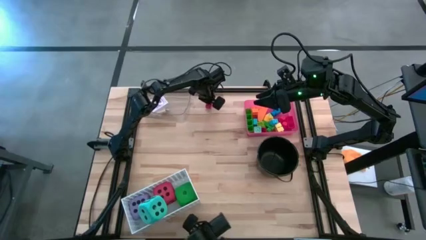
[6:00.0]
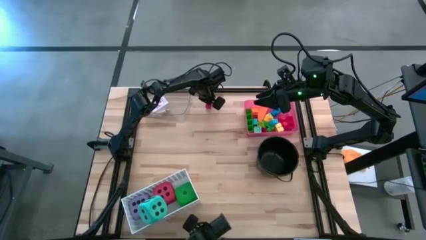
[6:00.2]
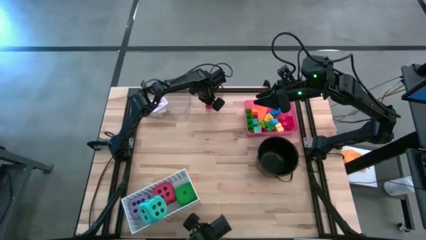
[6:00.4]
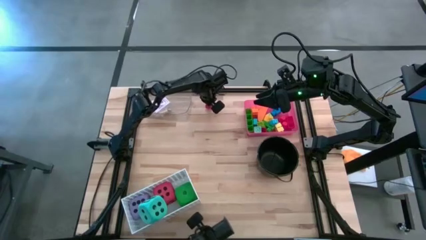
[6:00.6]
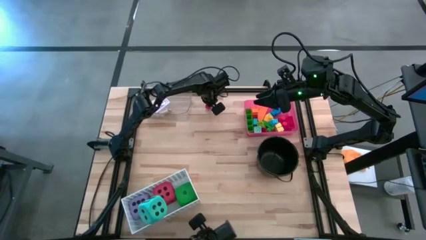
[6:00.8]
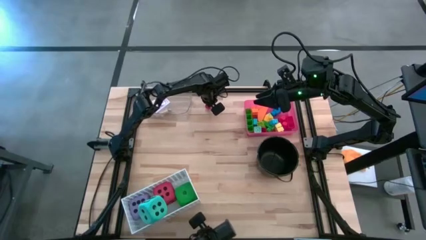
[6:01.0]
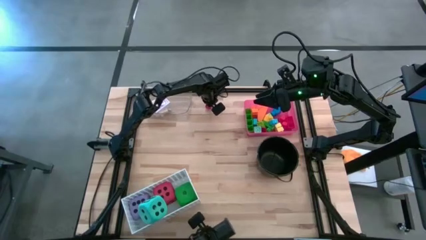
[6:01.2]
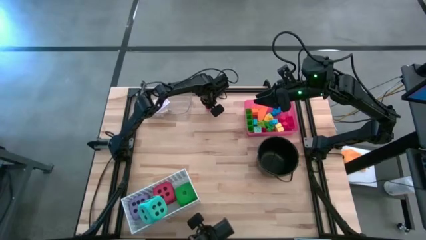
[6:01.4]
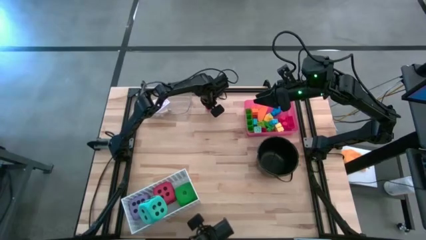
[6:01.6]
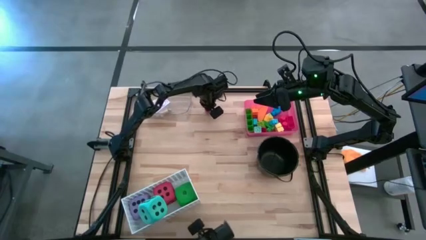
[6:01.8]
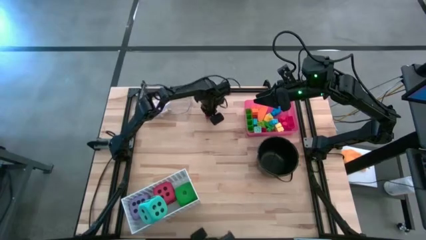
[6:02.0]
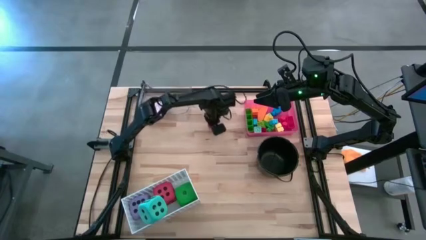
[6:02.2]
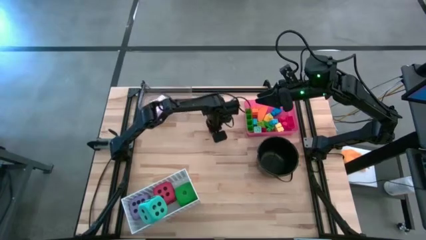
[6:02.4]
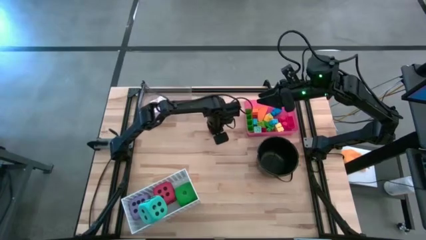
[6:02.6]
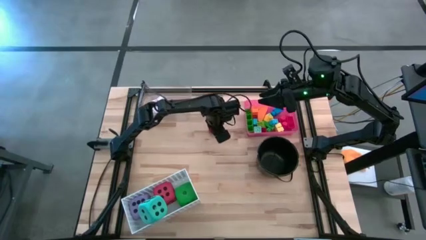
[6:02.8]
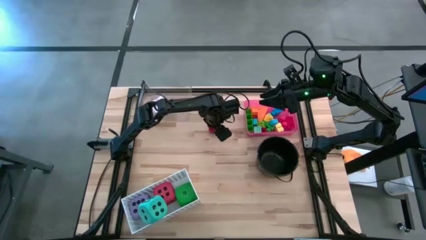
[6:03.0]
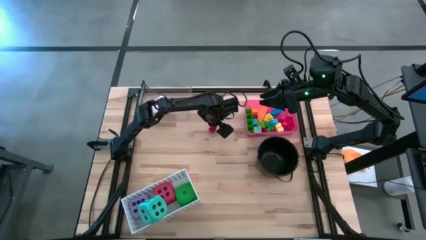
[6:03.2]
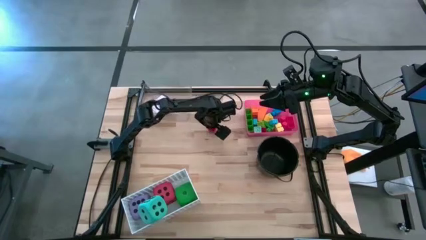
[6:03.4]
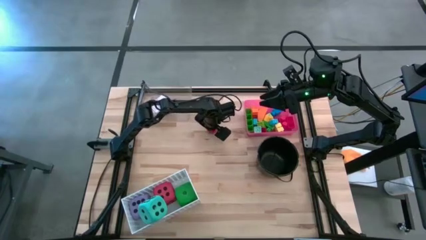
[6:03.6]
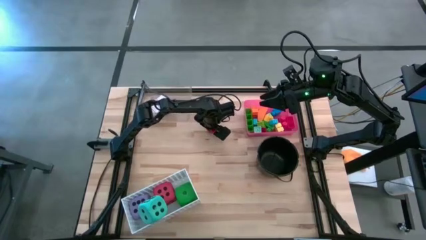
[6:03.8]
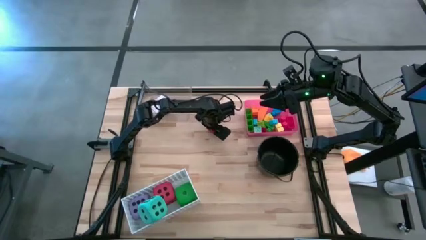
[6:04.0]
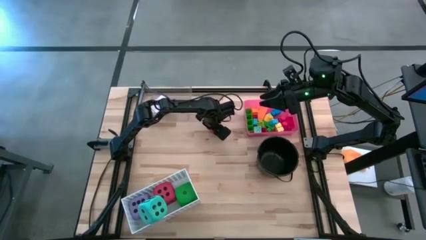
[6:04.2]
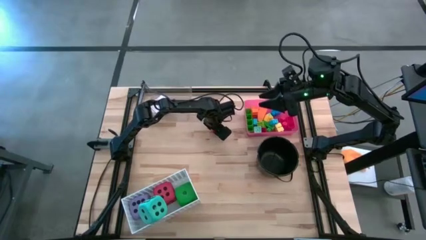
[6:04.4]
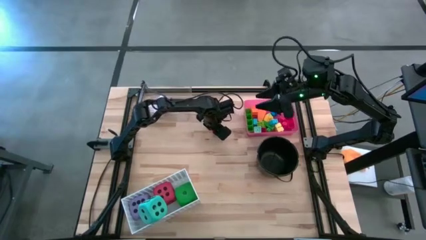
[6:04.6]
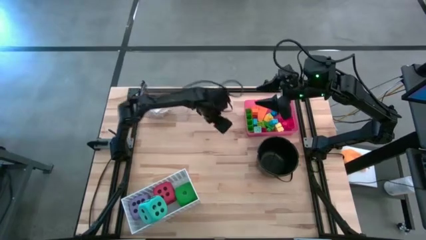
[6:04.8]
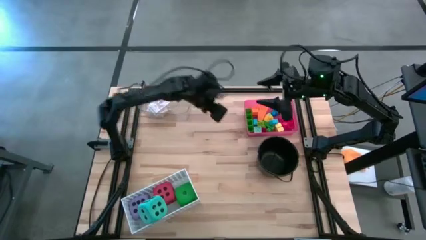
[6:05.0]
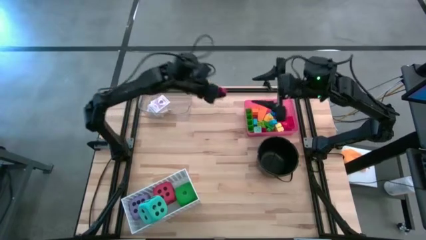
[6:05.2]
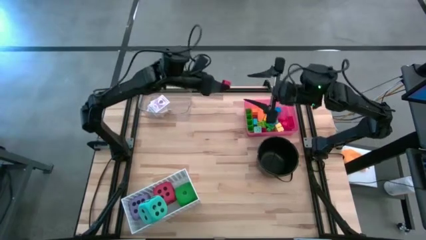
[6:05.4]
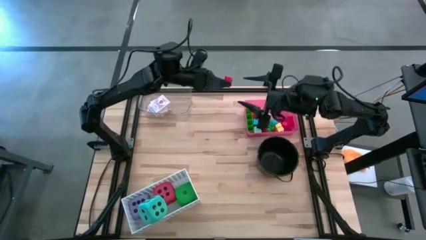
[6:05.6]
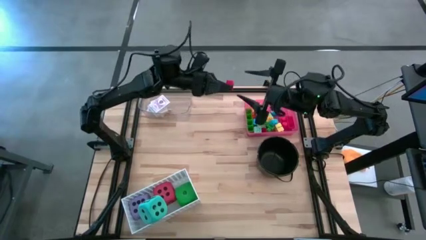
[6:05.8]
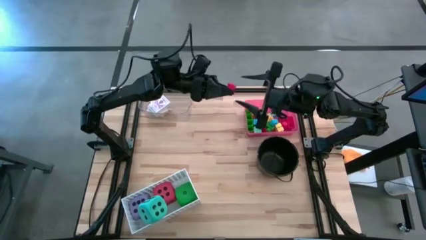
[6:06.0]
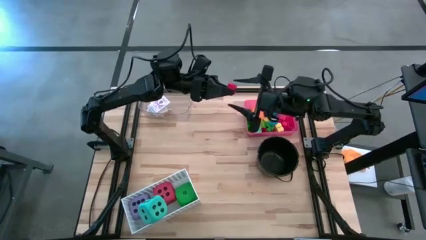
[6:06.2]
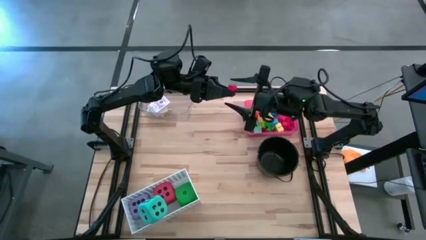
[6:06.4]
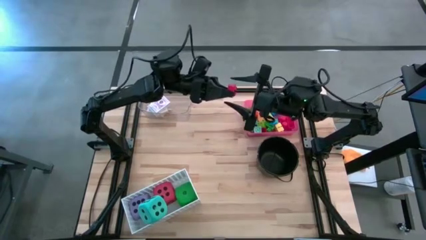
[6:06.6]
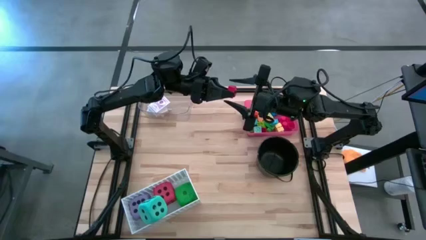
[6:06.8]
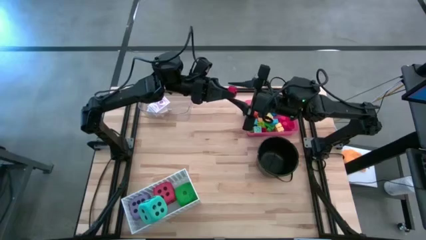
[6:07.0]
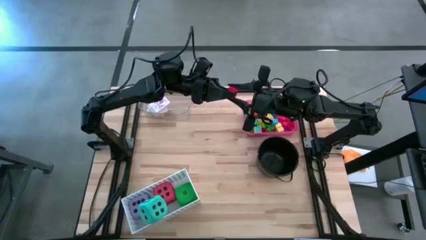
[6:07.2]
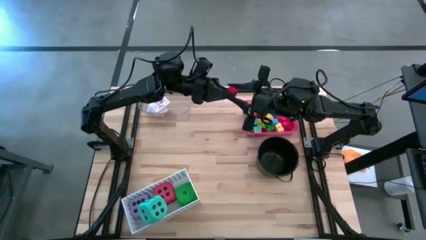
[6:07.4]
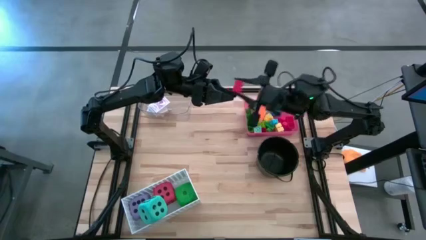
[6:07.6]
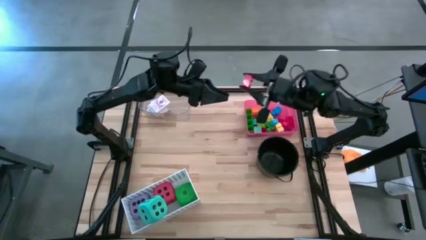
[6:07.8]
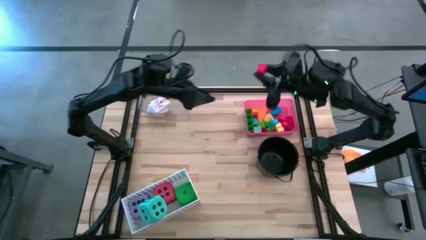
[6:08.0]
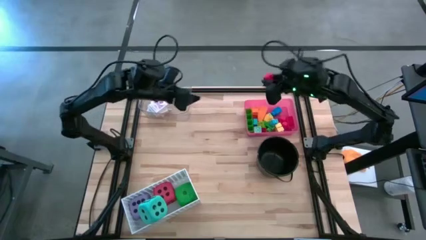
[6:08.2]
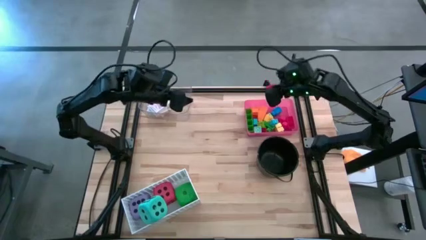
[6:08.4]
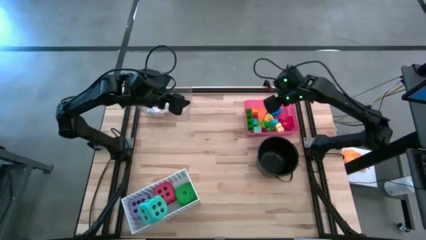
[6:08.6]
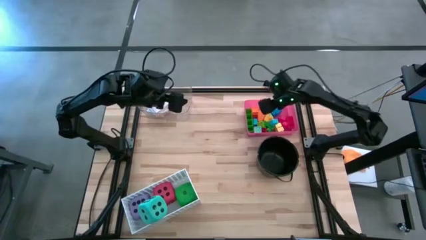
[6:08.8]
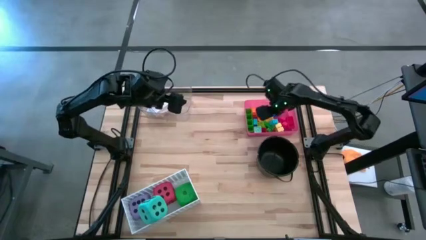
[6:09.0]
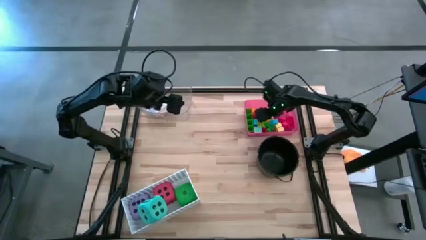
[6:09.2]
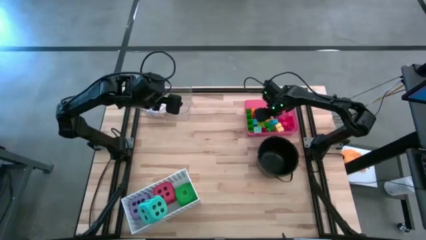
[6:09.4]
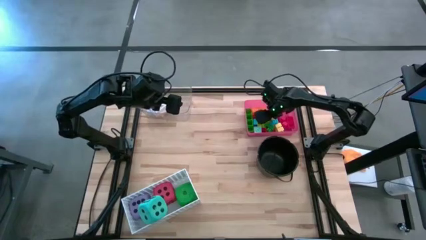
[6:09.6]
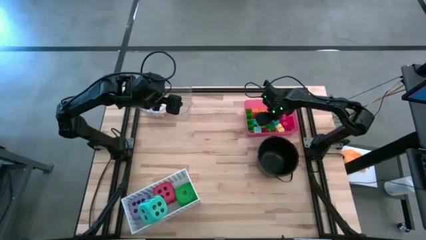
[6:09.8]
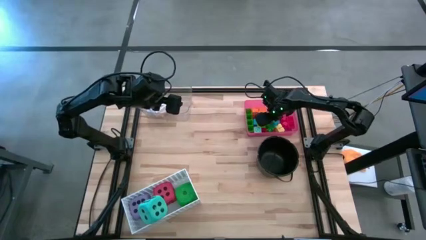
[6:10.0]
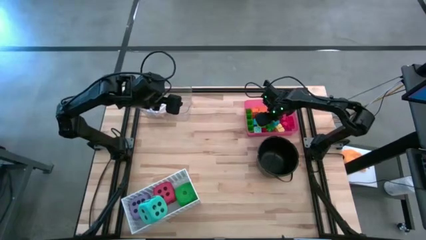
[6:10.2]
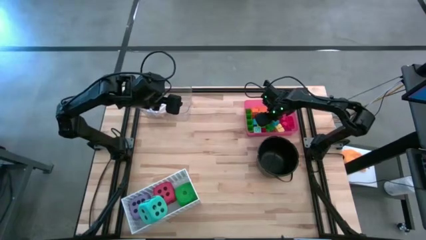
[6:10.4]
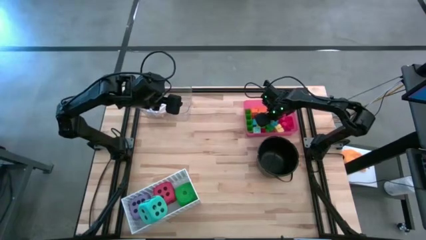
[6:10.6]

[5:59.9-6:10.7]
Task: Pick & Place Toys
Put the red game piece into the red bin

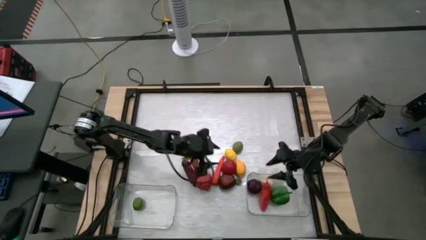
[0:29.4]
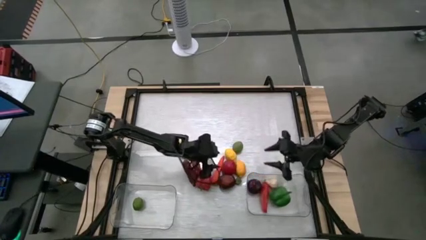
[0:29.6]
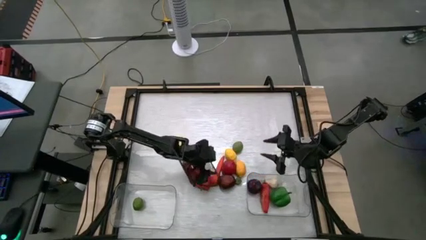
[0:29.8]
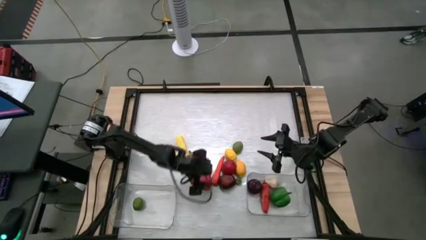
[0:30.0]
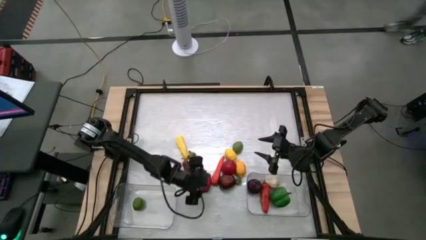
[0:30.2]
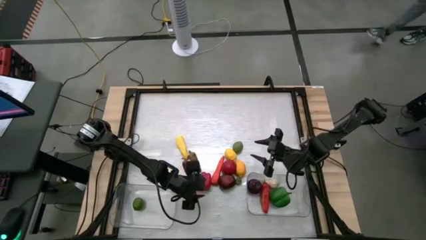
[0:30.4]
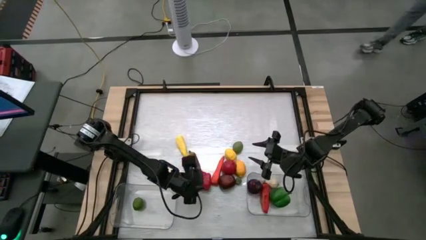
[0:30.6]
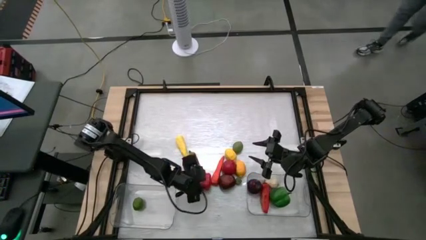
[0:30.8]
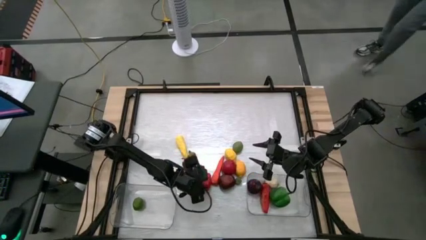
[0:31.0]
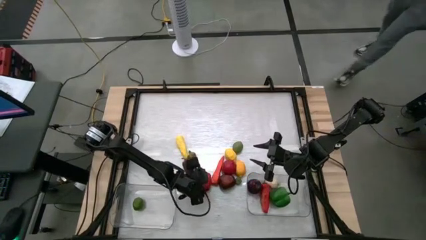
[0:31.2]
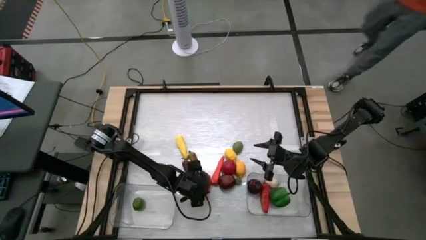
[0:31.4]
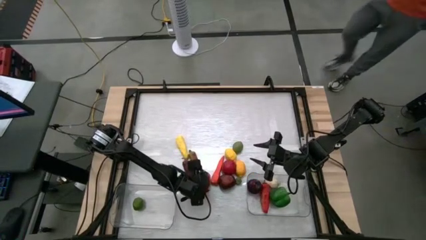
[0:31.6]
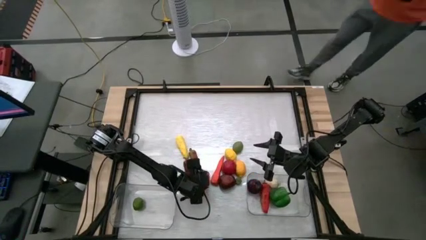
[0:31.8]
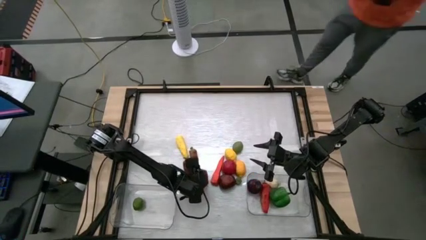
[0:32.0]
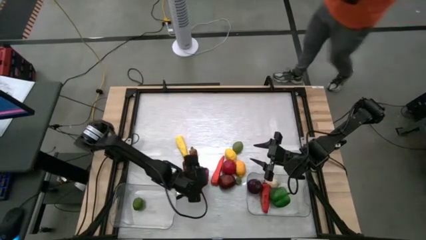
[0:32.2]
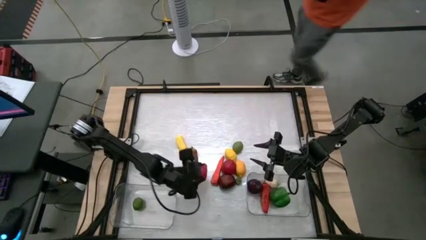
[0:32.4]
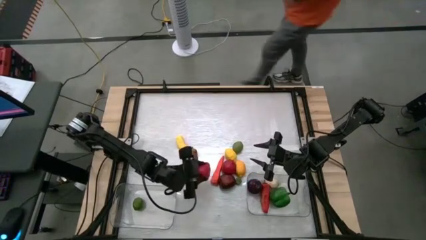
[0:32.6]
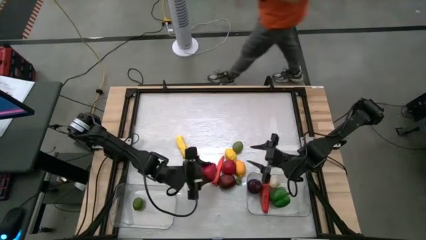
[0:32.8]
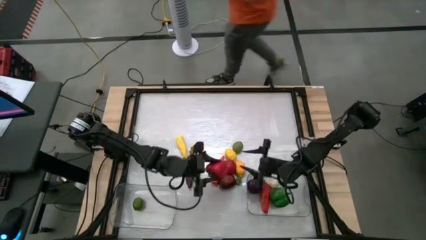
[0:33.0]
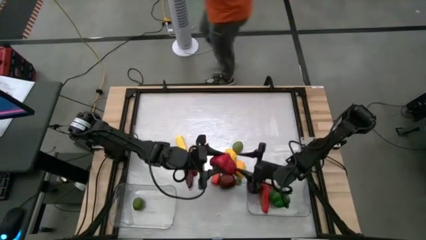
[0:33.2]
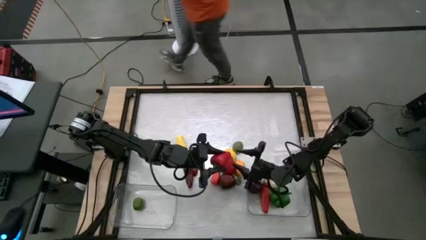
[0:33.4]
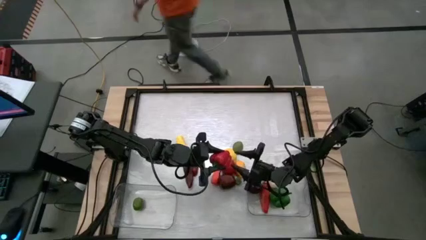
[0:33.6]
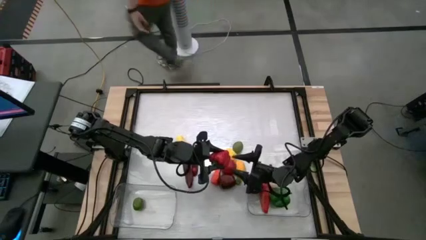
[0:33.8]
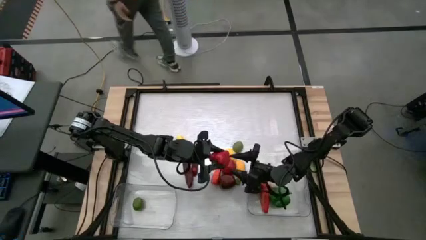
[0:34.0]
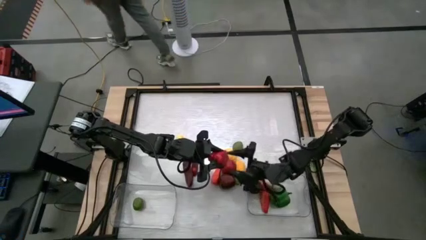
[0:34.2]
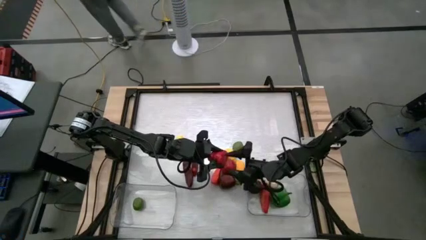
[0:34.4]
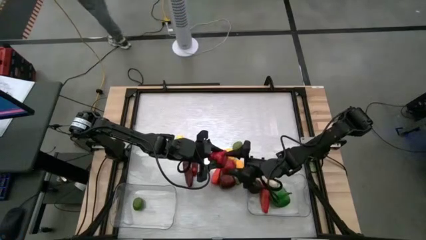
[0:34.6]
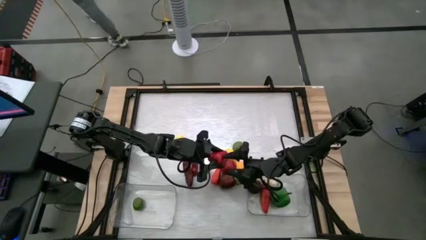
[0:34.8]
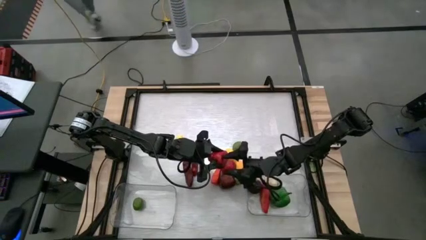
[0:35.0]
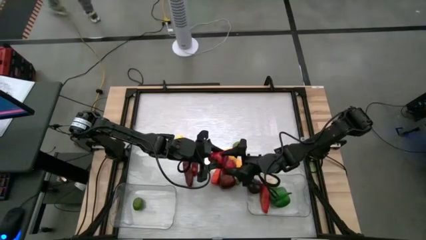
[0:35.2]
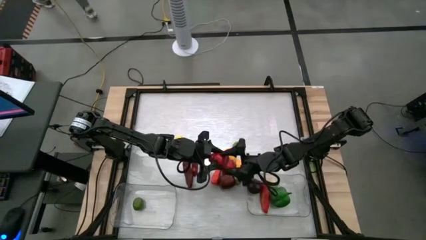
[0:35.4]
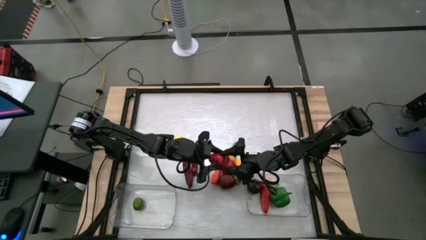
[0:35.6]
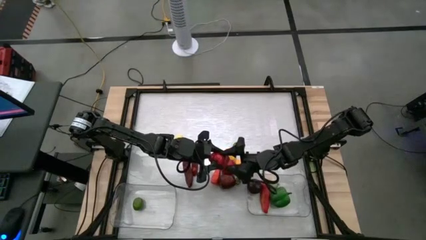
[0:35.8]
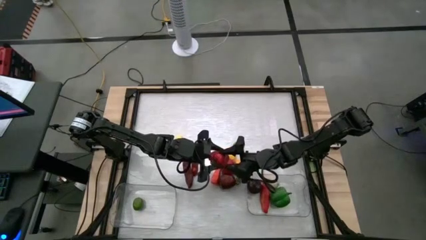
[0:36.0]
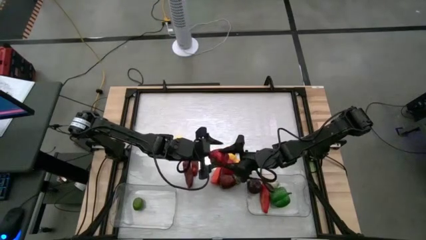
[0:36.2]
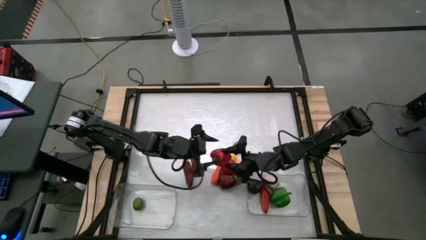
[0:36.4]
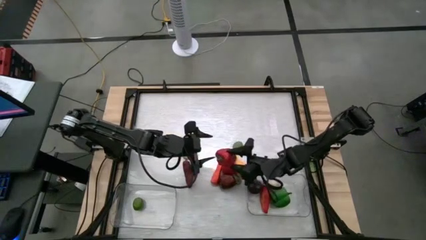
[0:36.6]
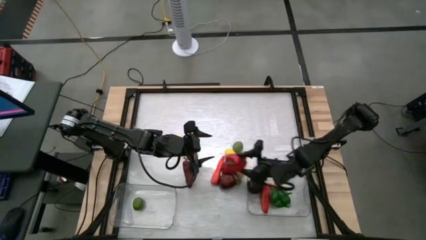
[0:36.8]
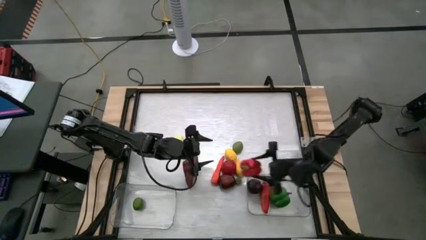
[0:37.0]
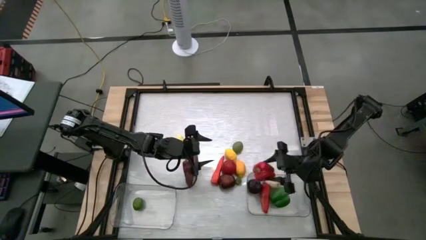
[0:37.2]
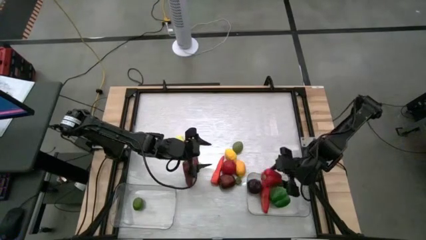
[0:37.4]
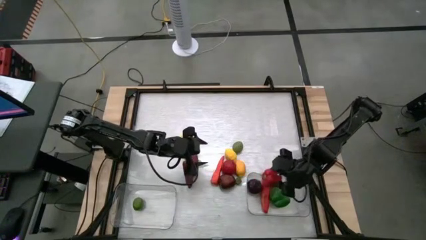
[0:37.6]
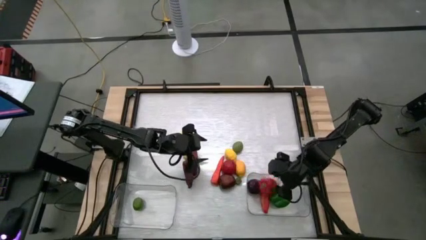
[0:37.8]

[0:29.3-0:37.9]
Task: Sort produce into baskets
Put the red bell pepper into the right transparent bin
